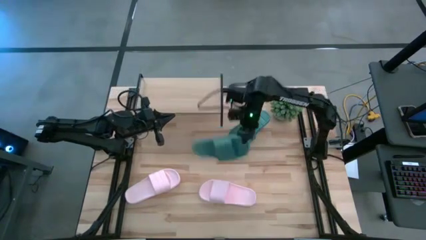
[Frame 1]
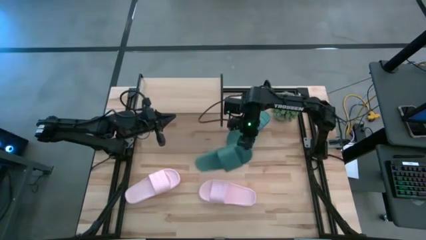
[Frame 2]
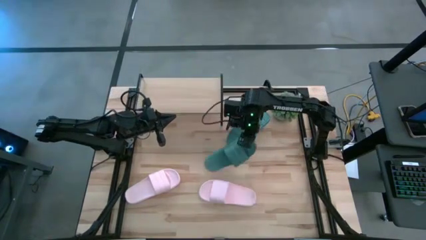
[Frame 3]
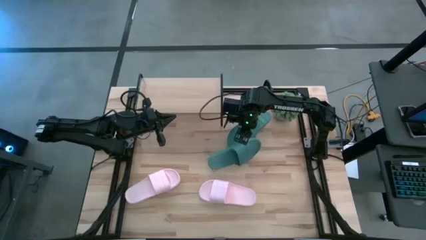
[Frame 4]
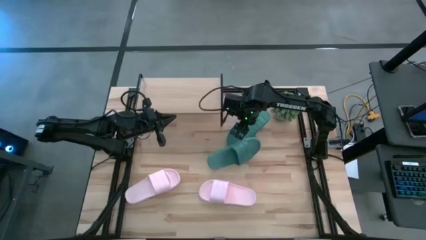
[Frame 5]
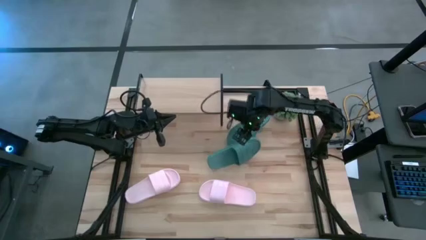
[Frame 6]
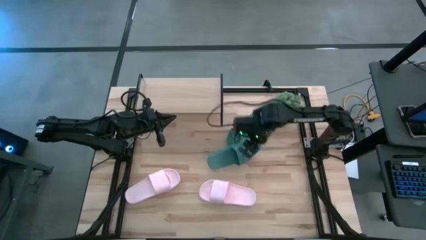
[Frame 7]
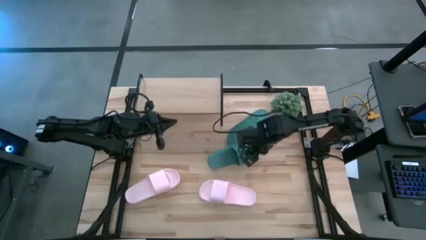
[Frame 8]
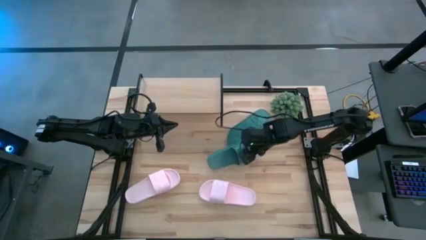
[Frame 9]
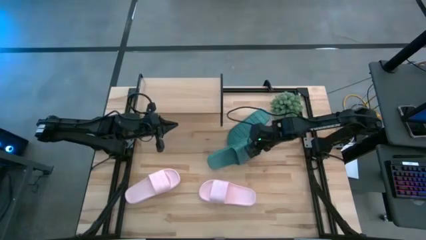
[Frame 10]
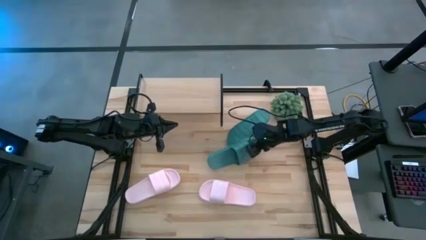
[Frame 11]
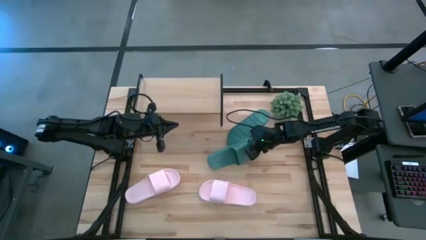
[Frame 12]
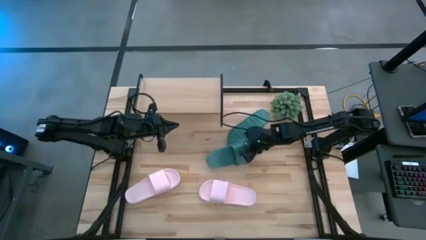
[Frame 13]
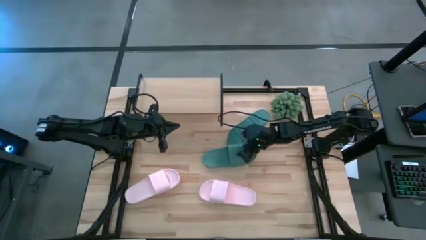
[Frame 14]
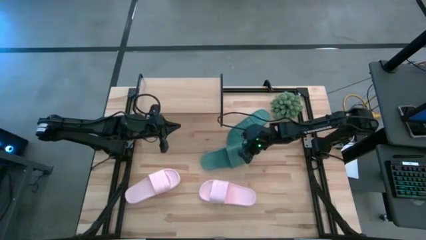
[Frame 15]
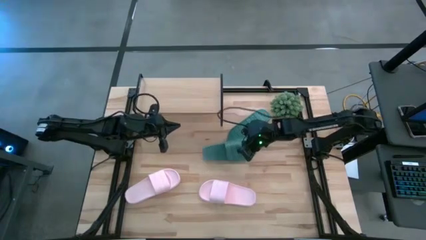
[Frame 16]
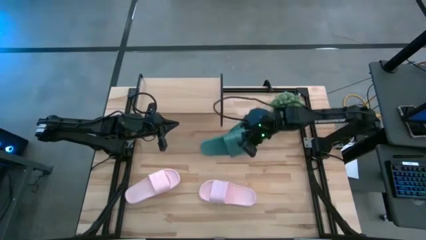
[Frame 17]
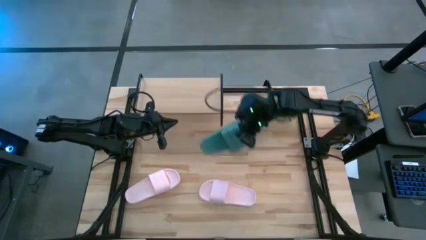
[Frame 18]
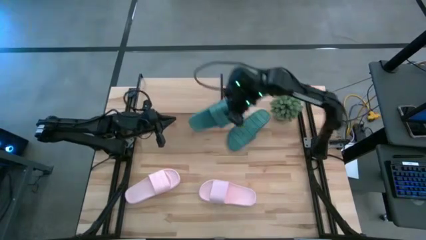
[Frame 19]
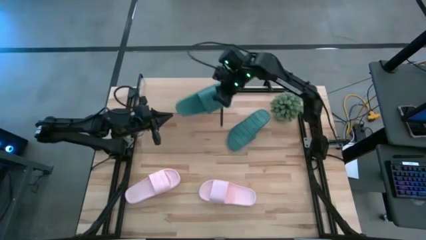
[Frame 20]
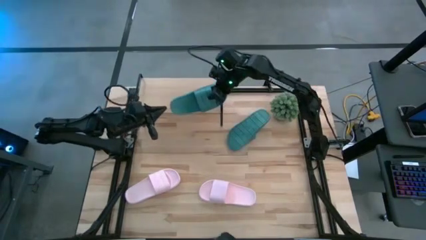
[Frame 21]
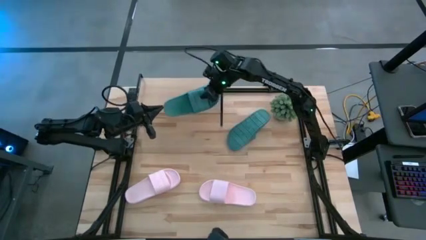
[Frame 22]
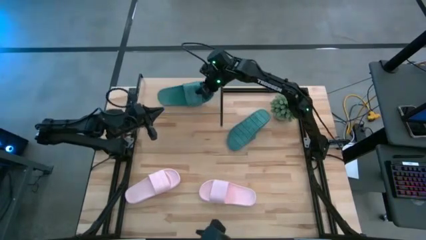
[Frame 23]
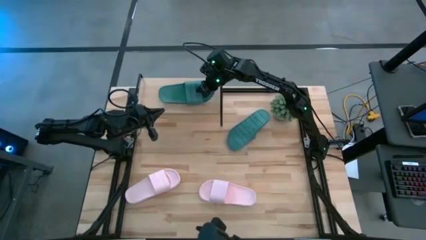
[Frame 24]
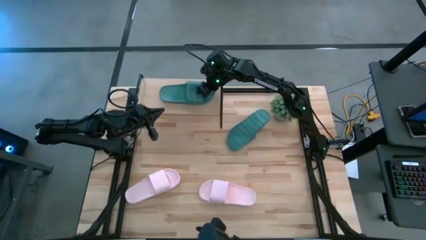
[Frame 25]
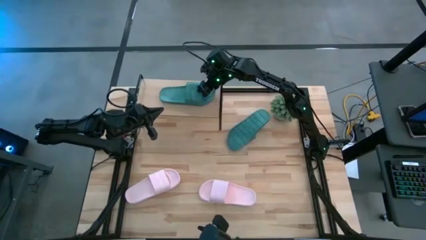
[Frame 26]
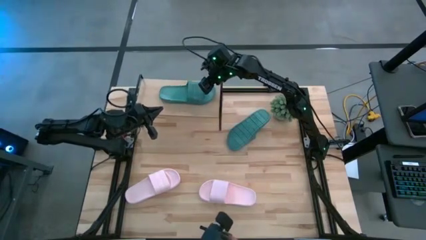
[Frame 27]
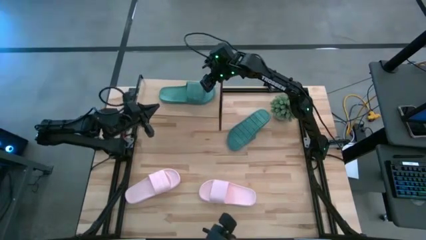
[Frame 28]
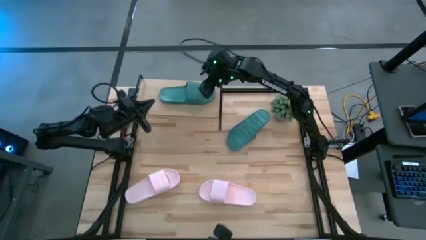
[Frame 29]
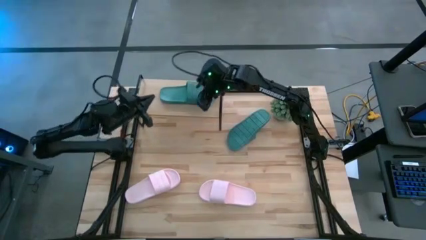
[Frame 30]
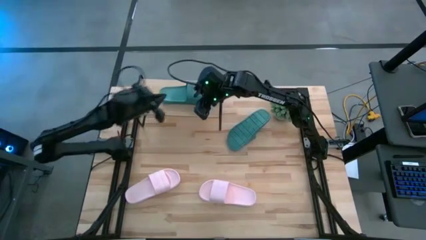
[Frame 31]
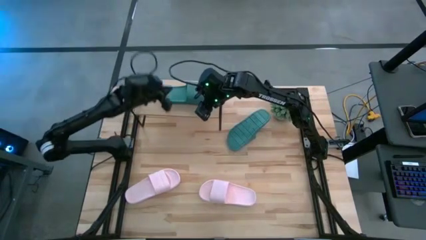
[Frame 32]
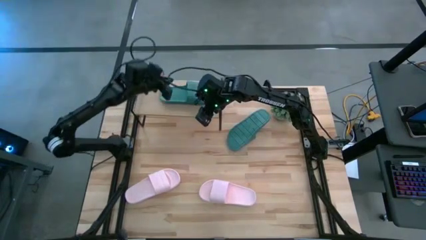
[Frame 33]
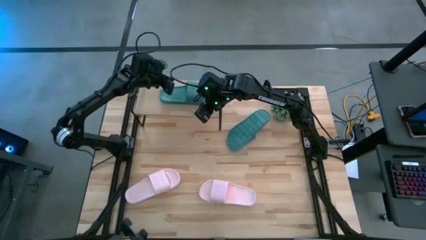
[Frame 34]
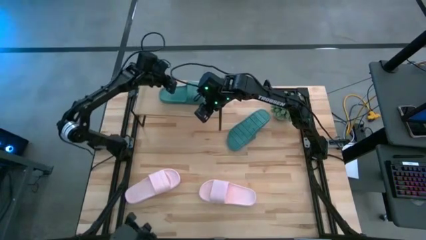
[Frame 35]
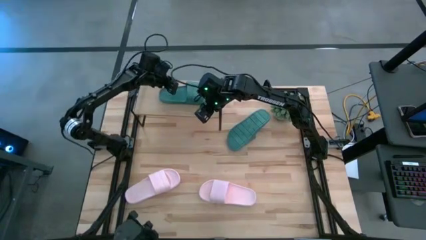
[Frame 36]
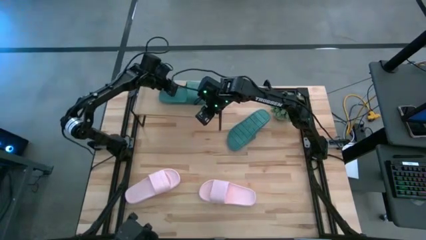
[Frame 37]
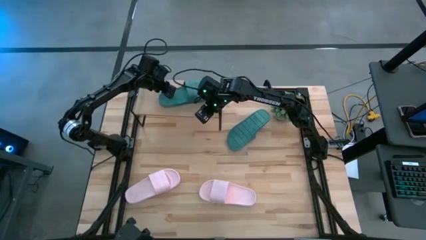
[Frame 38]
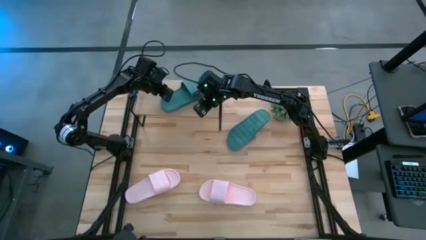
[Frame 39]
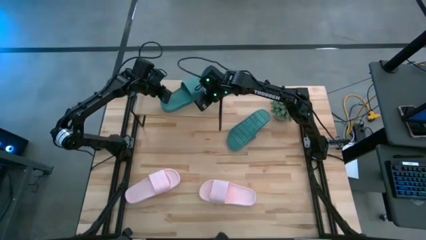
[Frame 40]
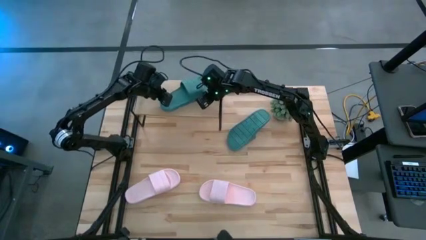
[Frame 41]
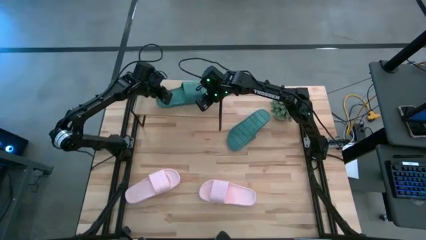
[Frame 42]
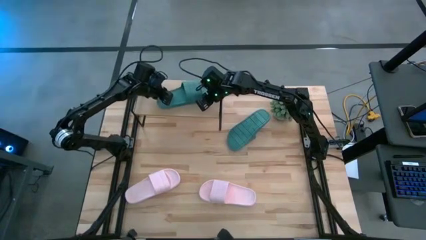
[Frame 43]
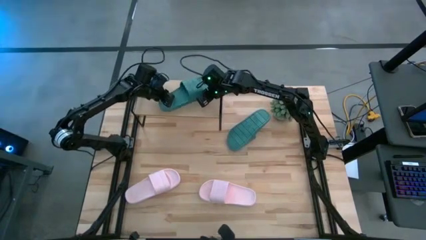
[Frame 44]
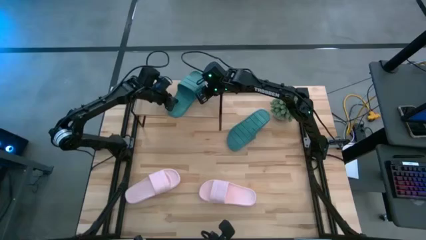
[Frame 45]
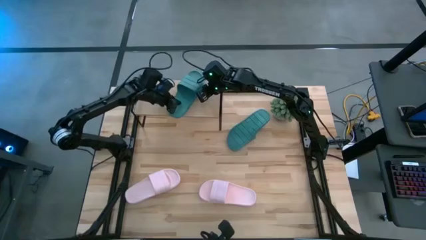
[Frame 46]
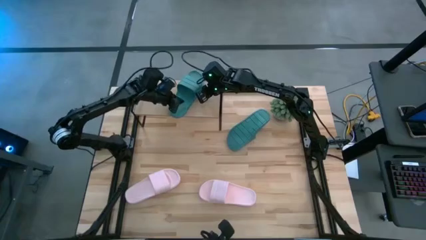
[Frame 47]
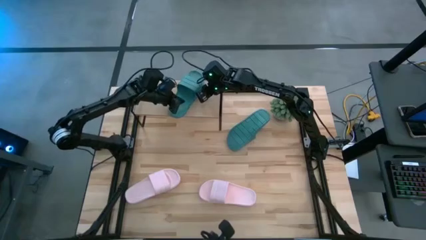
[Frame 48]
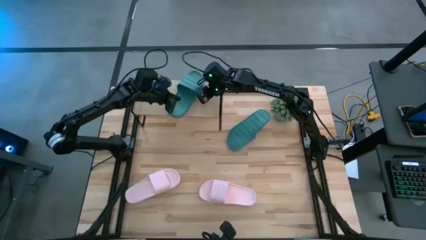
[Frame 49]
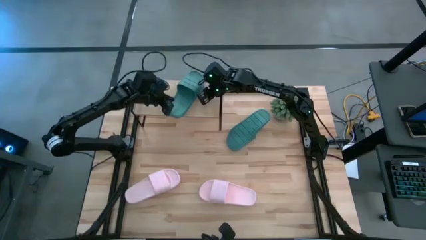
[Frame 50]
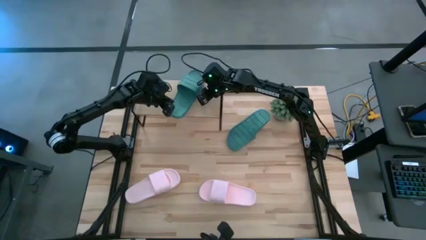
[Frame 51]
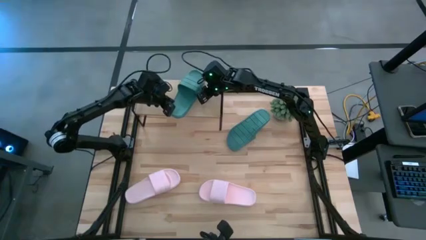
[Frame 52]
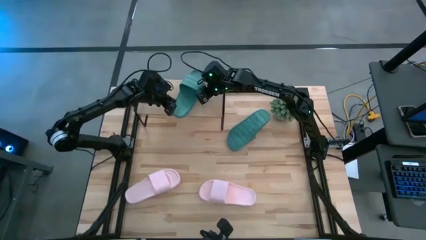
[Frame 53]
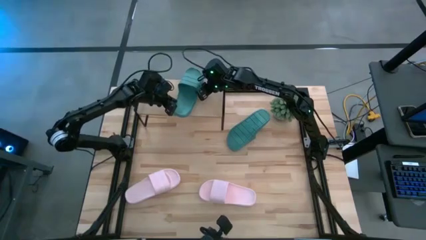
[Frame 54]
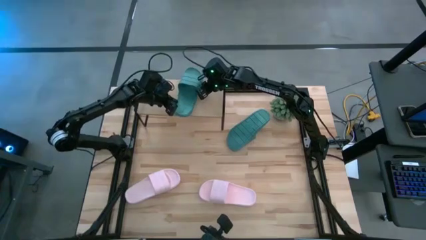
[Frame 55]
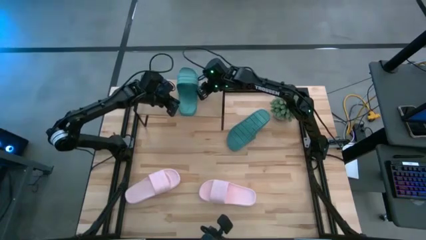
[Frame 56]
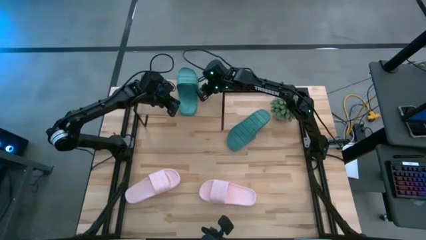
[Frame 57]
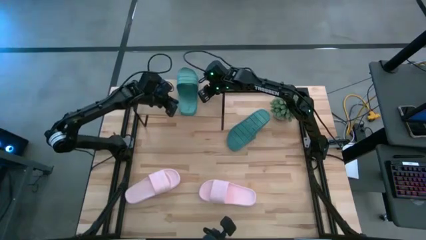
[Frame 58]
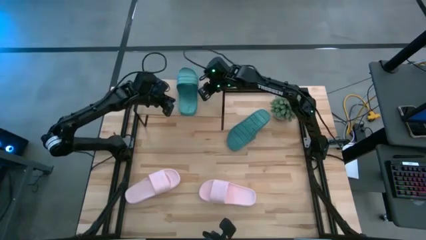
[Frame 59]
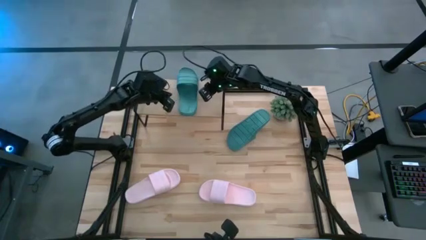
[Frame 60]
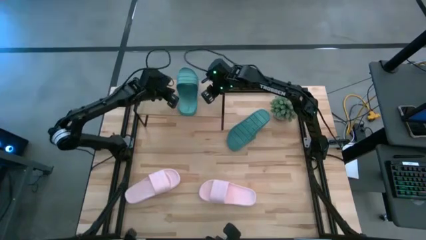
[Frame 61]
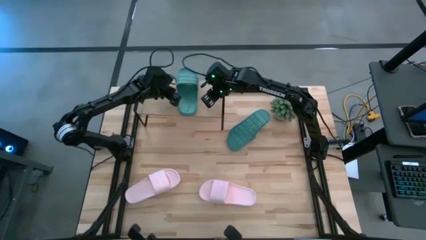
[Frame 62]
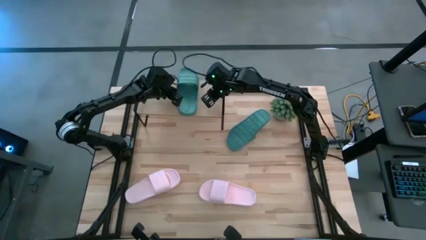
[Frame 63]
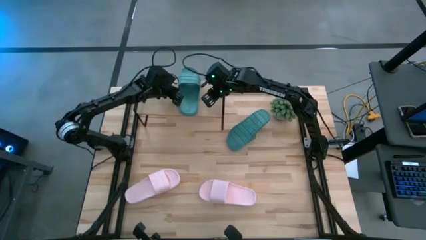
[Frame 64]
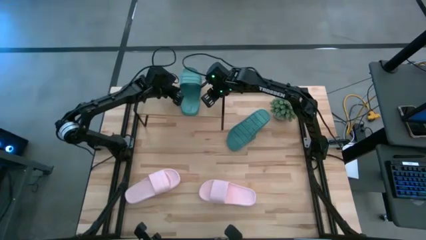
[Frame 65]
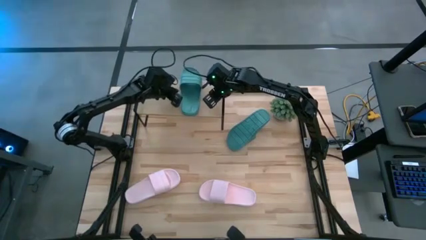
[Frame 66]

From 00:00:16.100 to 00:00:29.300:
Task: Pick and place slides into the shelf
Put the bottom blue slide on the shelf
